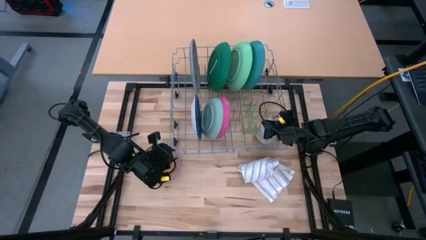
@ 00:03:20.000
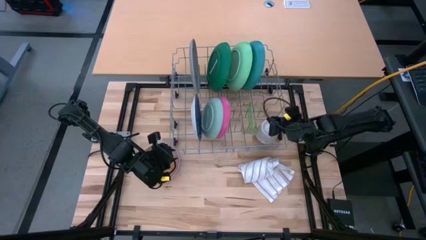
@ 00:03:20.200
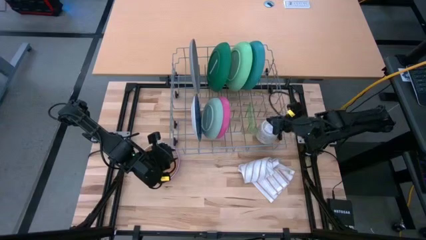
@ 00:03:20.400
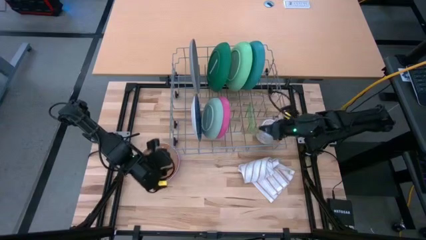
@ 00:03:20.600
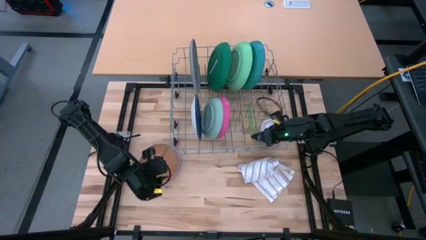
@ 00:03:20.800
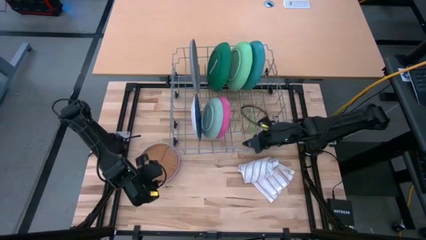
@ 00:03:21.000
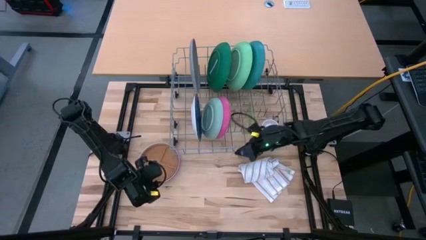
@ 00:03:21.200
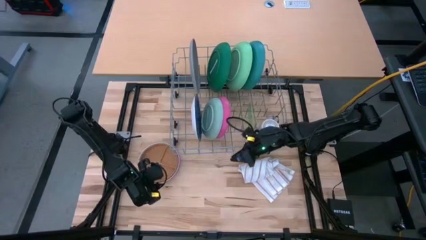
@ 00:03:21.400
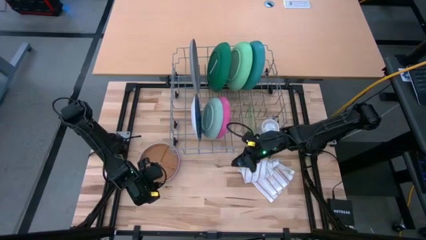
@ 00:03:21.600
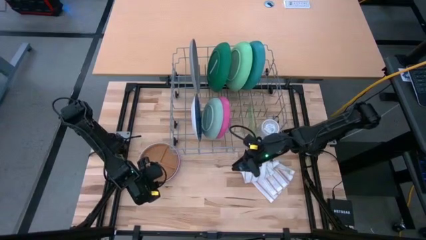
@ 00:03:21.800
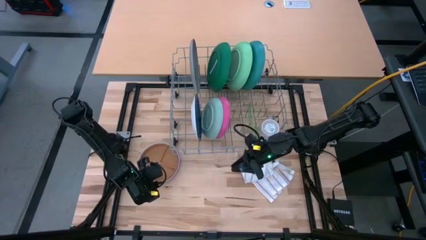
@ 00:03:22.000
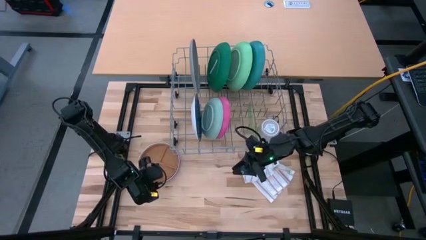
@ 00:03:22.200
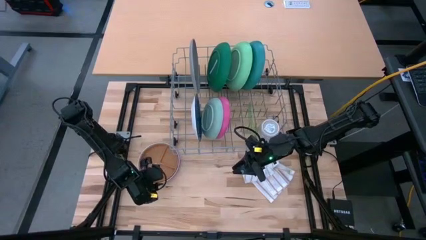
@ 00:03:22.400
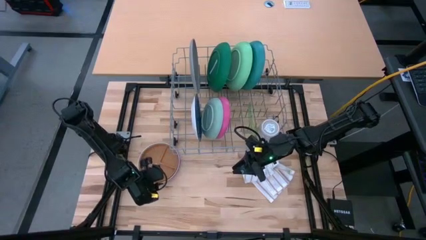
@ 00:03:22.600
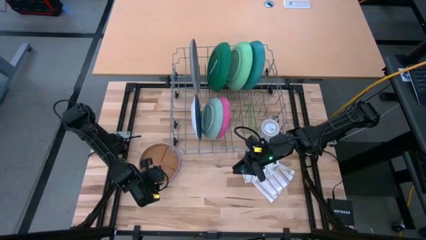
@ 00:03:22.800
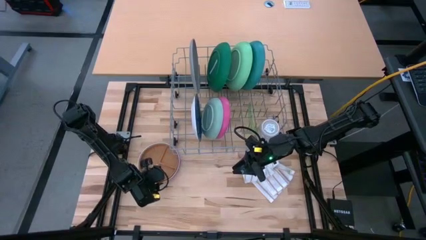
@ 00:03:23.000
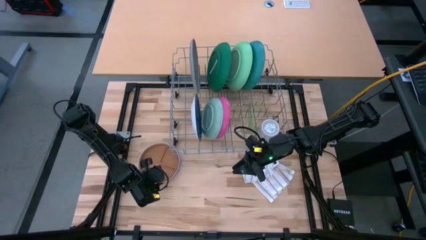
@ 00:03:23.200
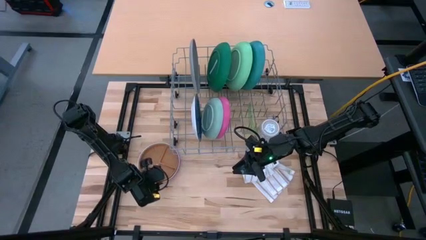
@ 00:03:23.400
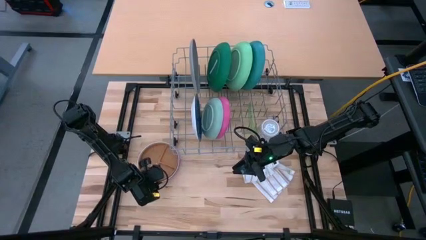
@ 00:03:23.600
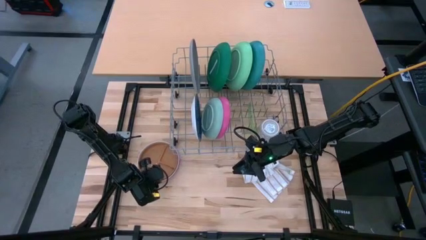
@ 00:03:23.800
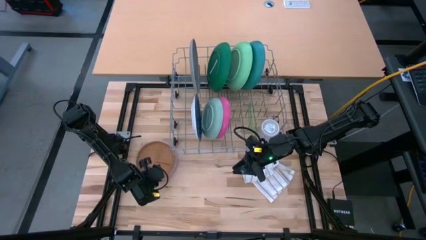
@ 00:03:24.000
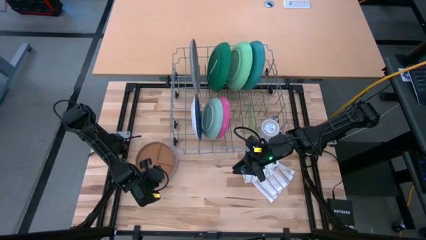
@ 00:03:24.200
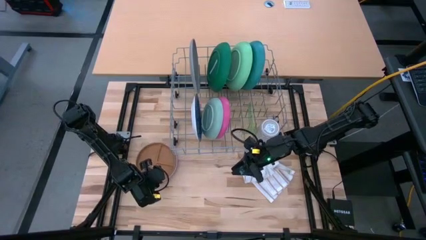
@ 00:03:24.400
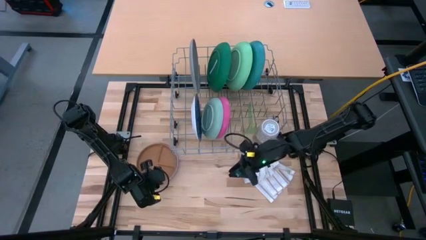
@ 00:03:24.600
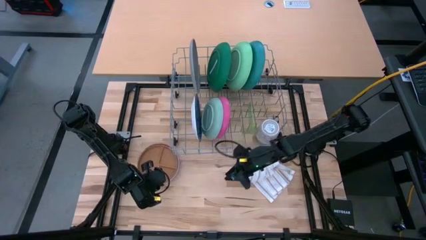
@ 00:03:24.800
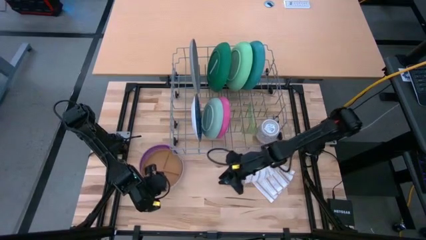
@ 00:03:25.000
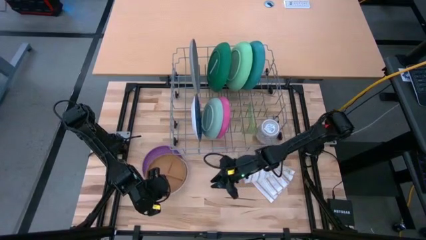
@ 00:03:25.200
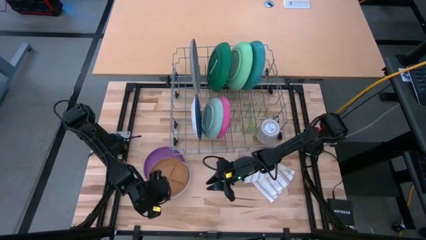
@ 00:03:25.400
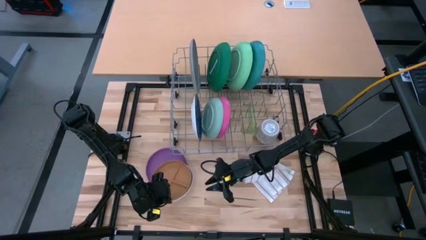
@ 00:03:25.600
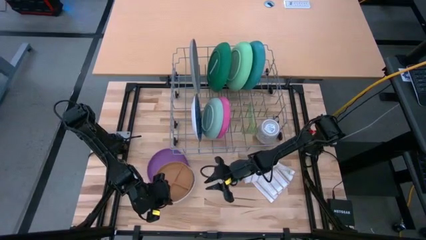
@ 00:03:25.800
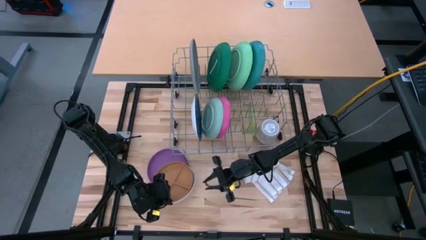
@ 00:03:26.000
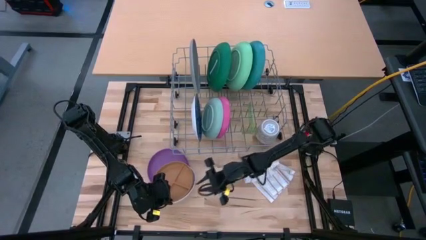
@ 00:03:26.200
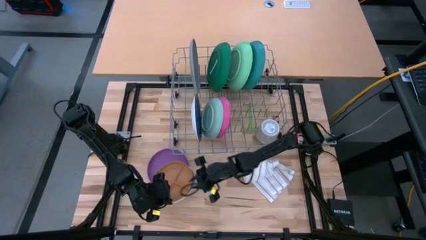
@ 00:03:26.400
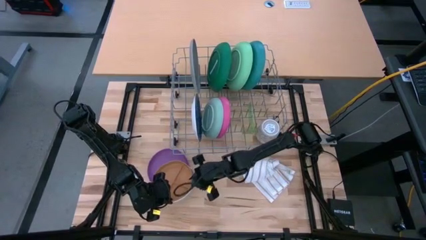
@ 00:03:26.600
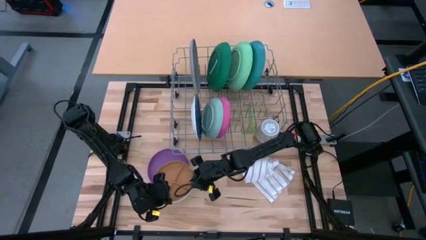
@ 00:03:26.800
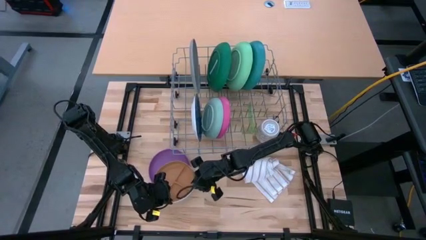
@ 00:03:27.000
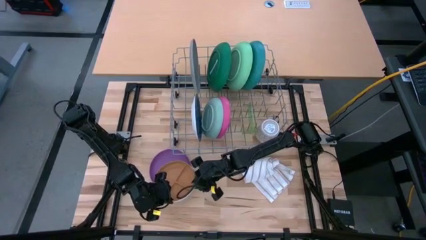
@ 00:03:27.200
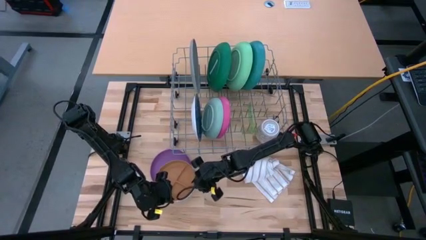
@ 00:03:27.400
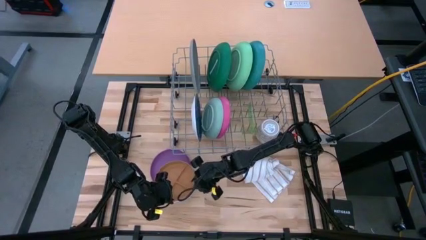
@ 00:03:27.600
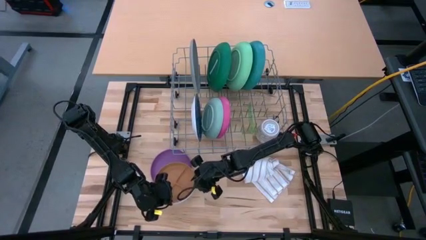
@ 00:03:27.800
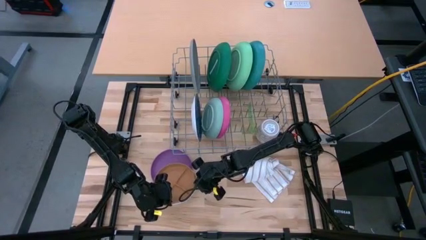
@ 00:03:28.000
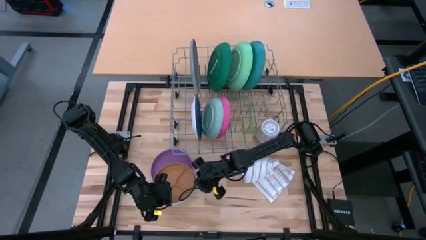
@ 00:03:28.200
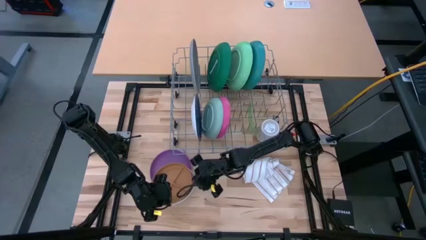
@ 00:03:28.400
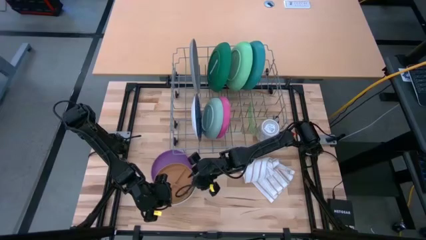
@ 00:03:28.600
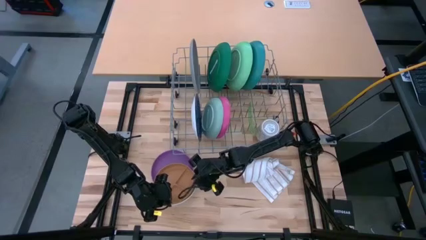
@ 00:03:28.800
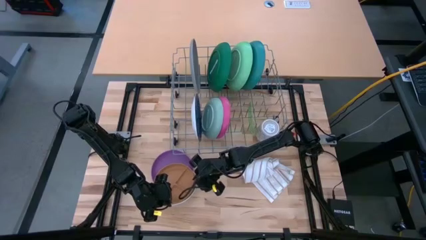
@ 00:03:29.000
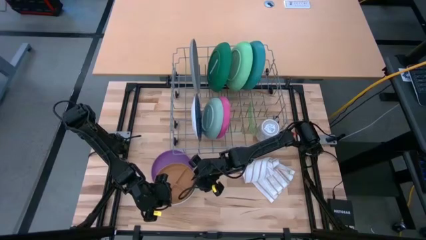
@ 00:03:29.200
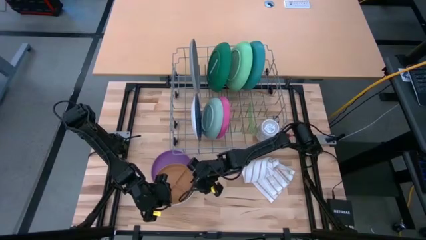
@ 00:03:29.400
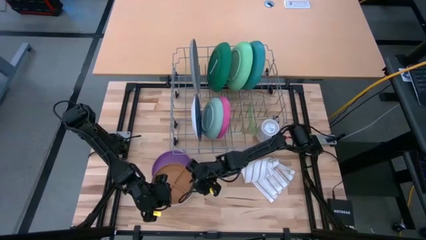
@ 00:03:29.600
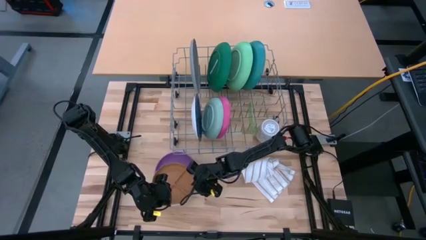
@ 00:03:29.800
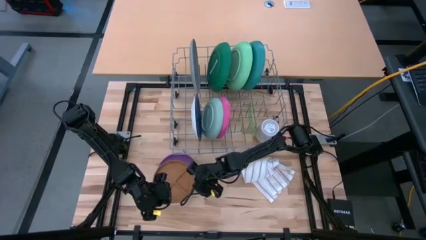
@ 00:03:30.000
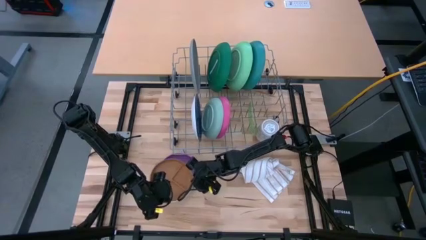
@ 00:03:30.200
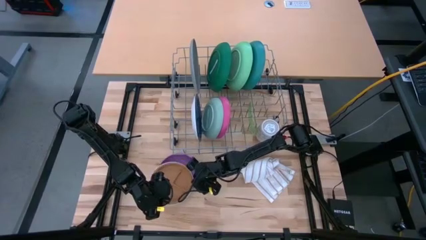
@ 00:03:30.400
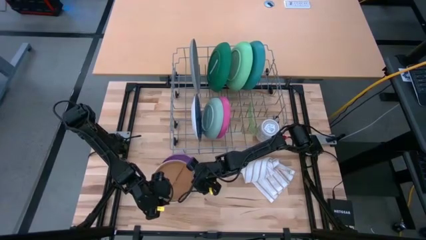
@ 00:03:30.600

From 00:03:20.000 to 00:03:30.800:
Task: Sort dishes
Put the brown plate in the dish rack
